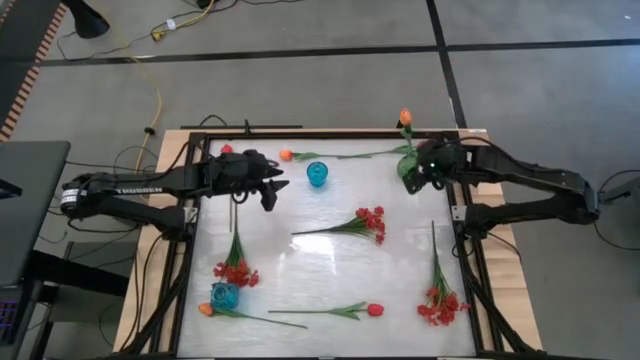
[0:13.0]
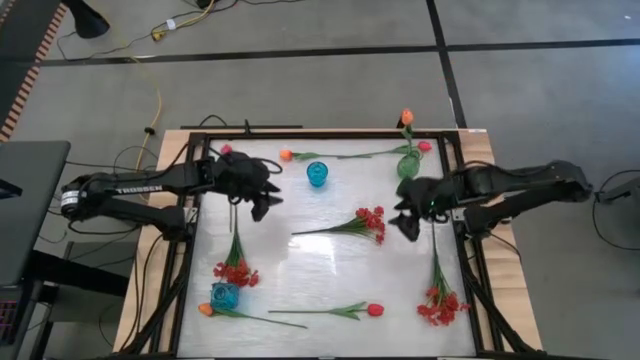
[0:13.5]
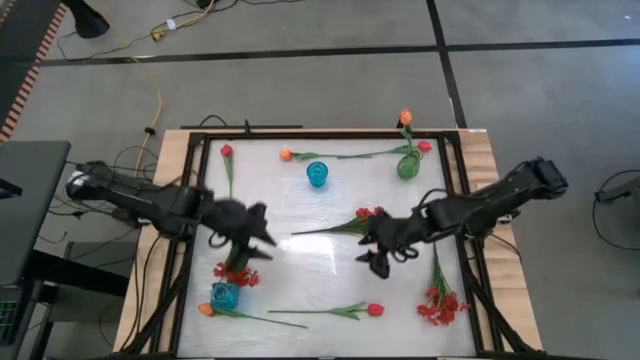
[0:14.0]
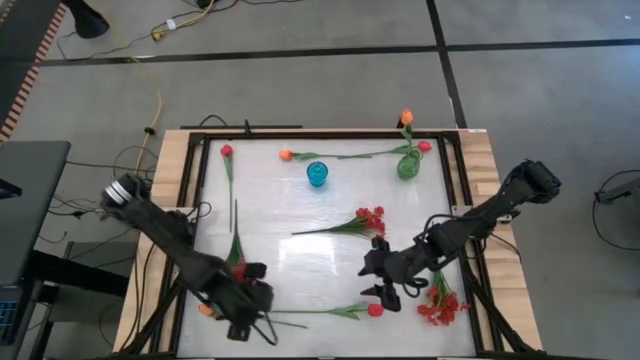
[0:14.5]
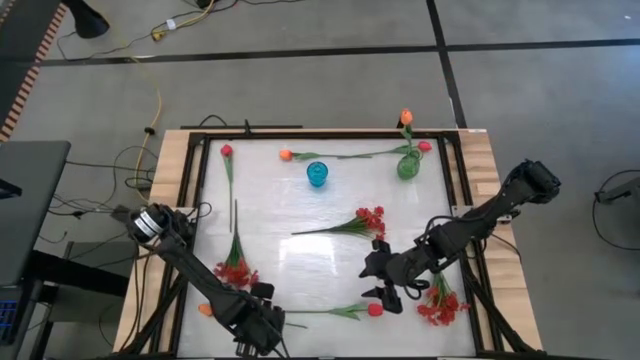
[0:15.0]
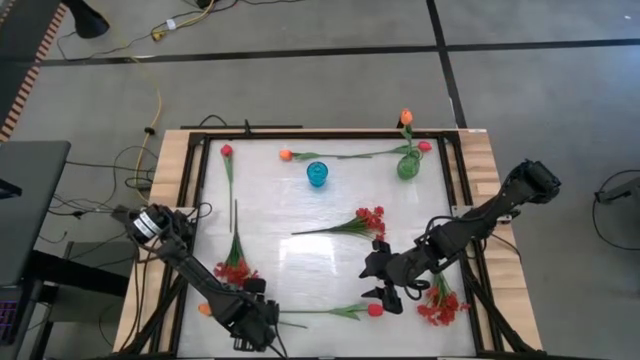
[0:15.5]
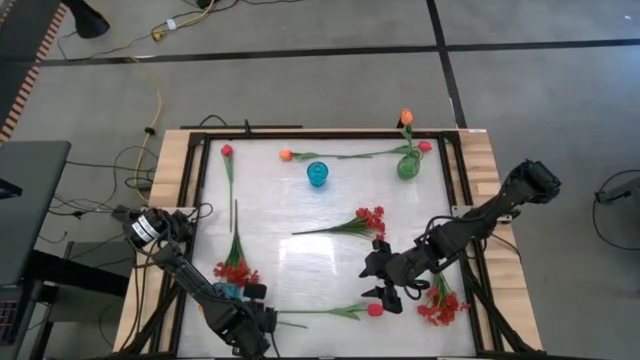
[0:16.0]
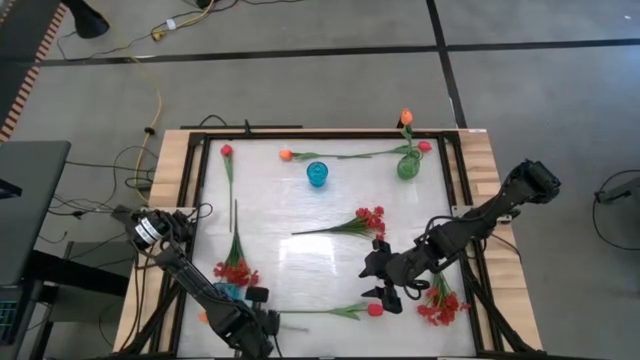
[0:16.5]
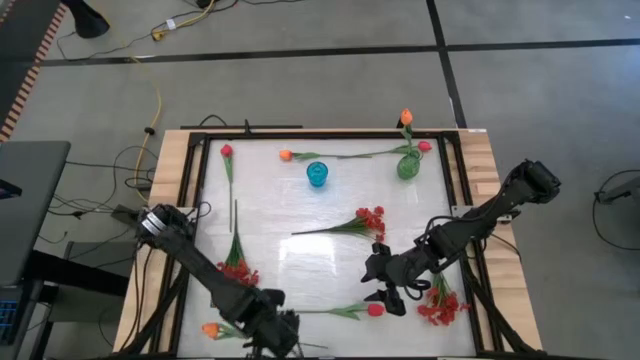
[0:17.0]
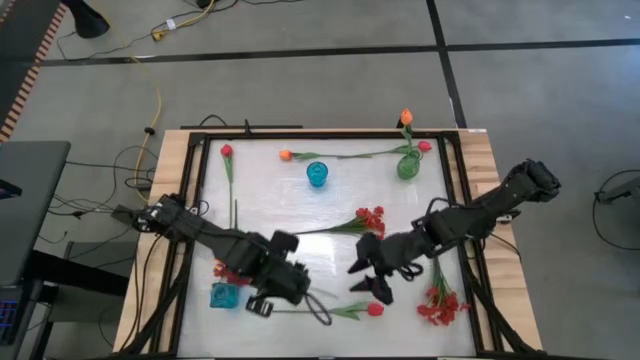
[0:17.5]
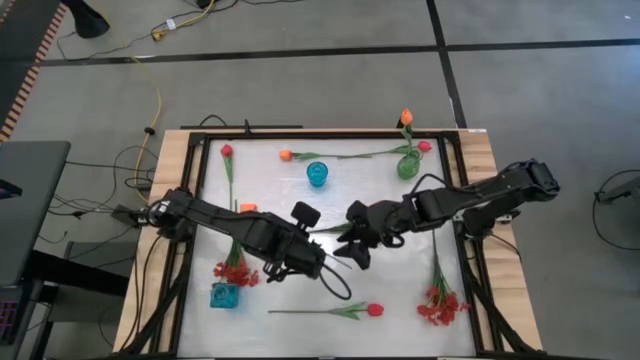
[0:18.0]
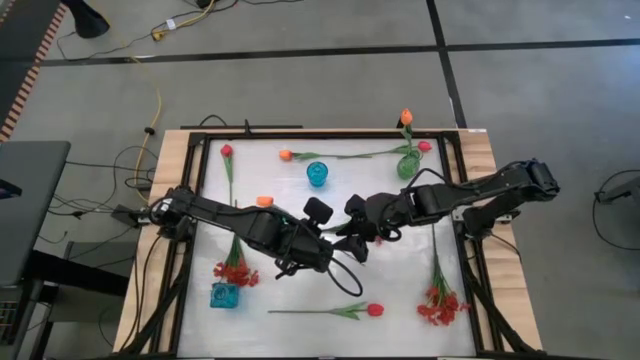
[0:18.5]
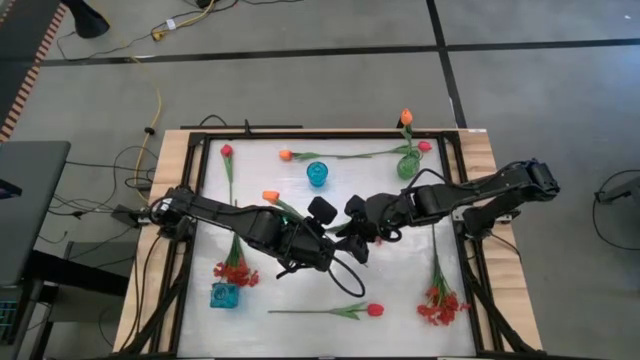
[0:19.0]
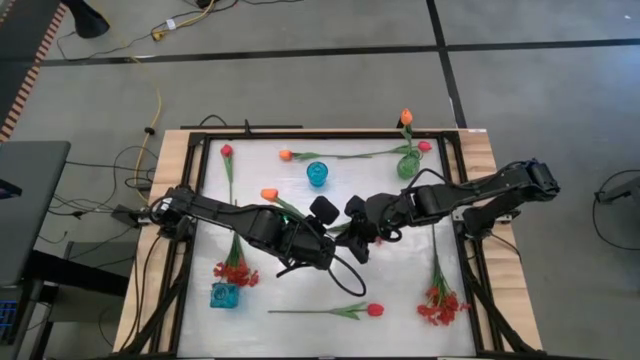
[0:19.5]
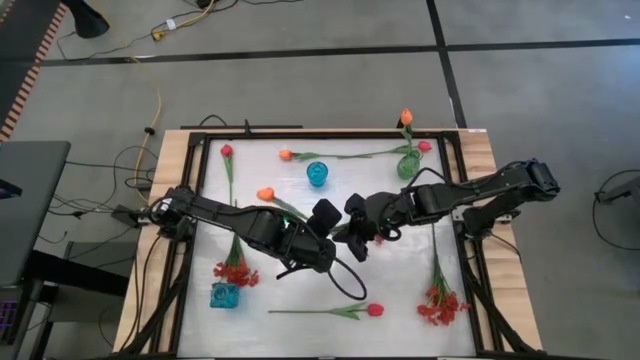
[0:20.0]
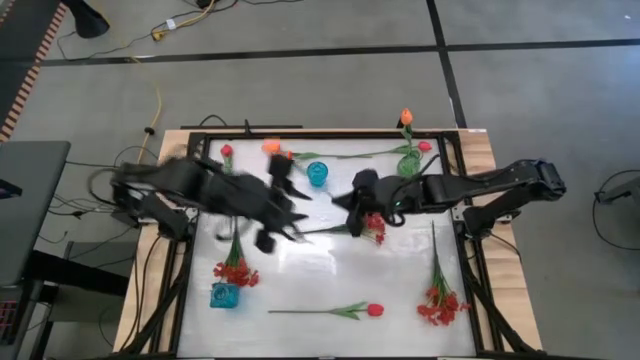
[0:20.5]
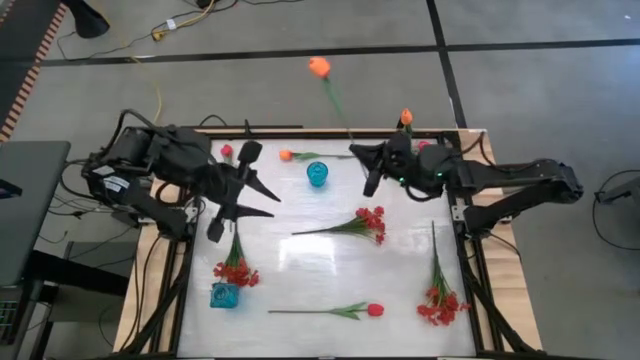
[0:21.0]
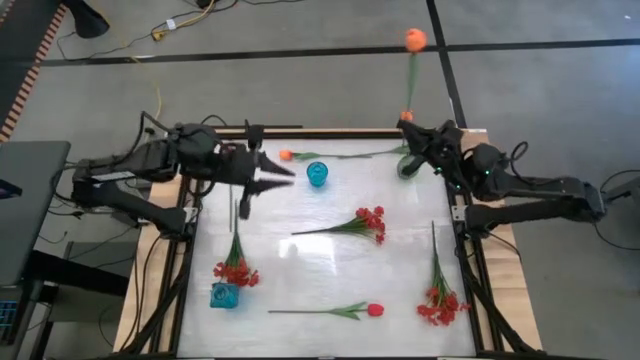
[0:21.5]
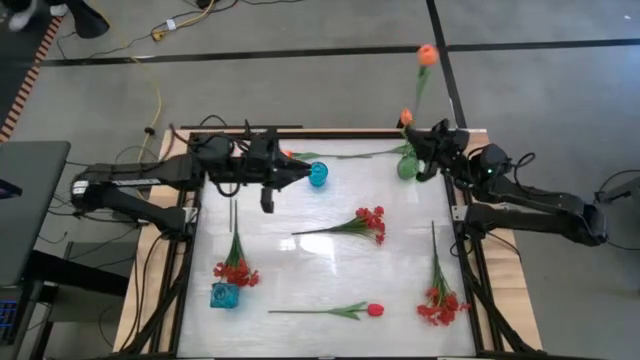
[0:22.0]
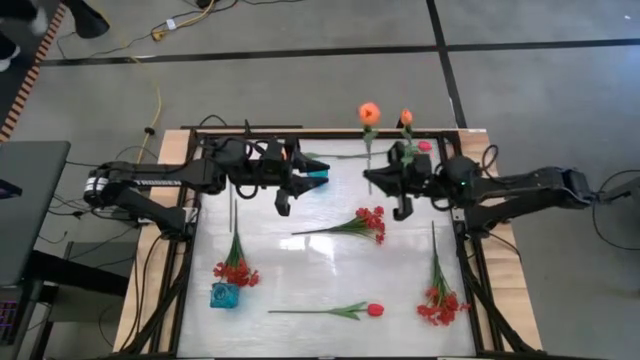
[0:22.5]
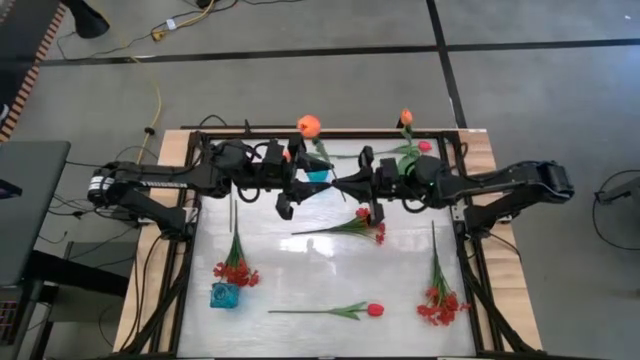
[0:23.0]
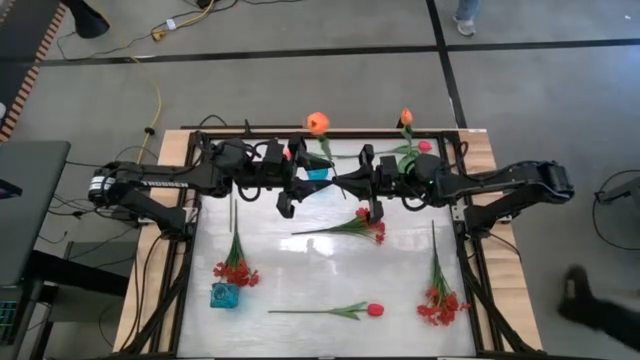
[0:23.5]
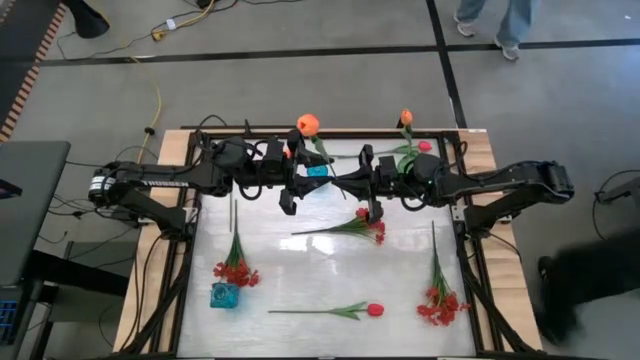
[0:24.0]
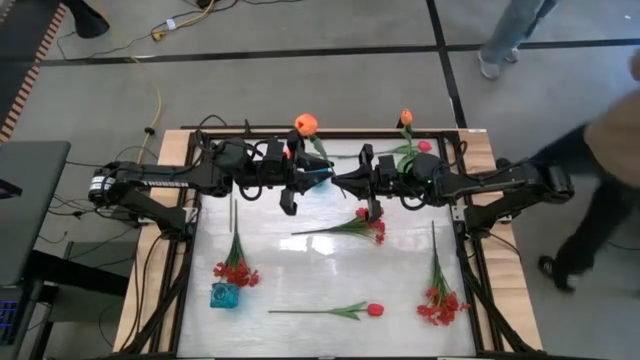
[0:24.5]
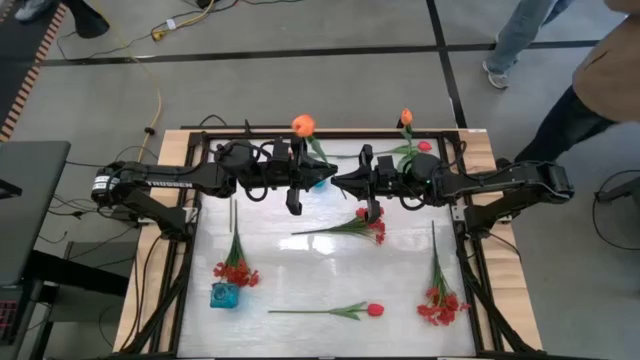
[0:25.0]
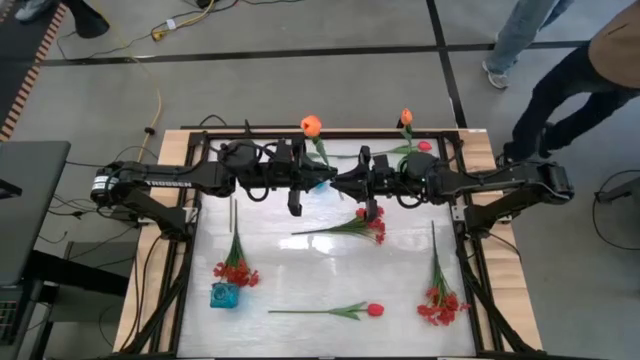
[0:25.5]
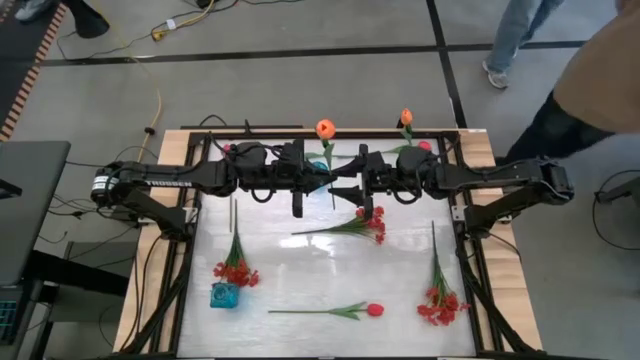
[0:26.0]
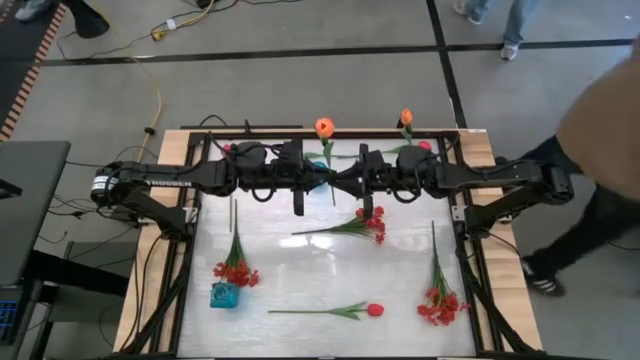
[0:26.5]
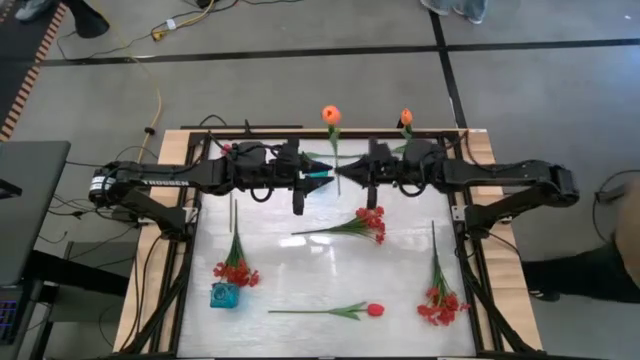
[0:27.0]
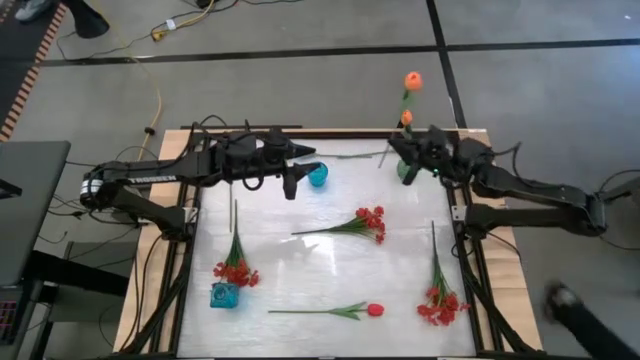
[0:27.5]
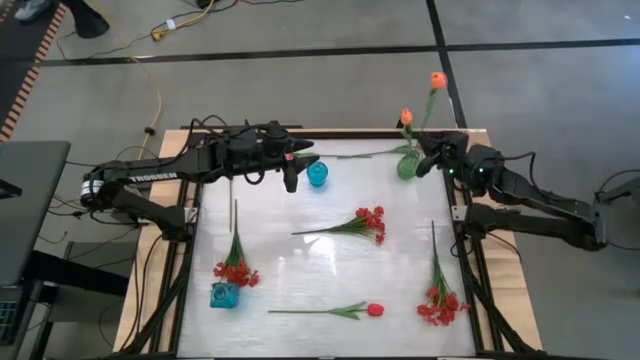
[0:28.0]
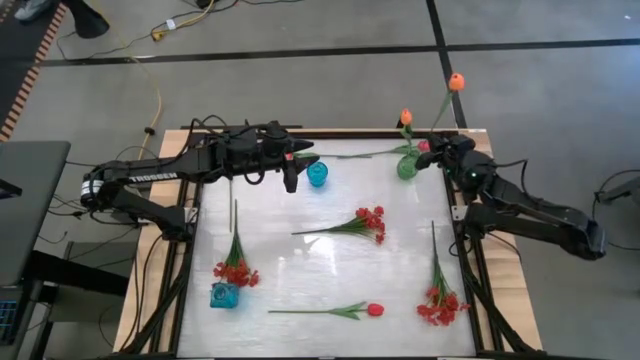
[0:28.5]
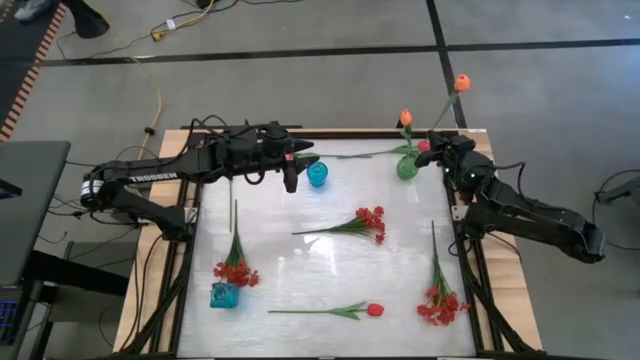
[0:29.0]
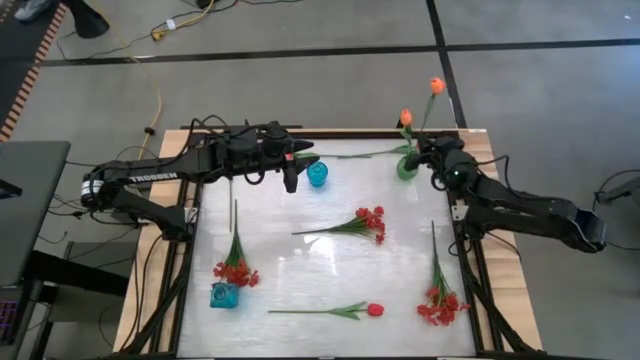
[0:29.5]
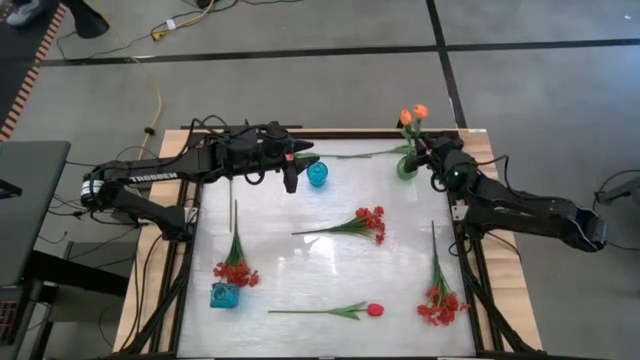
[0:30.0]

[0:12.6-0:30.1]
Task: Sort flowers into vase by color
Put the bottom orange tulip into the green vase

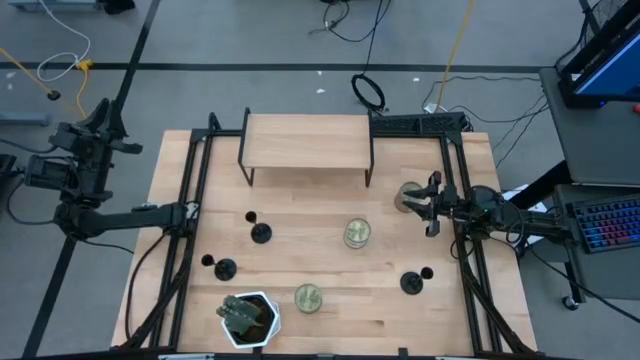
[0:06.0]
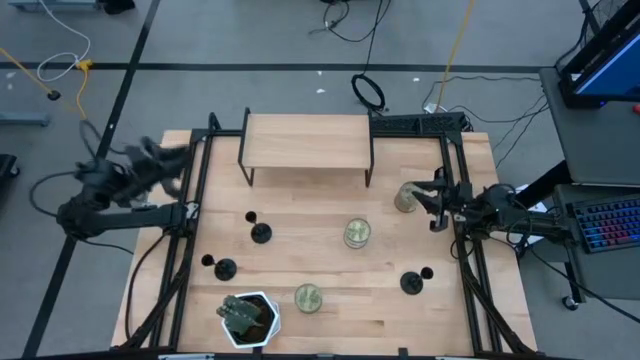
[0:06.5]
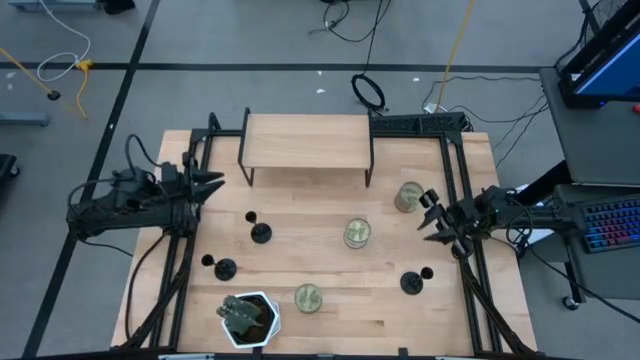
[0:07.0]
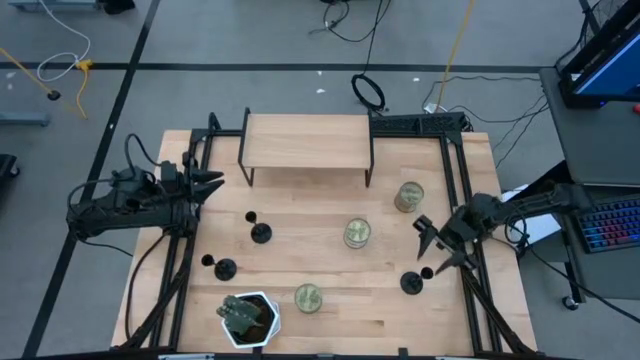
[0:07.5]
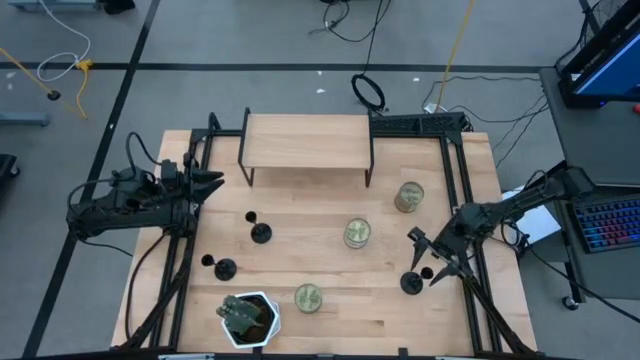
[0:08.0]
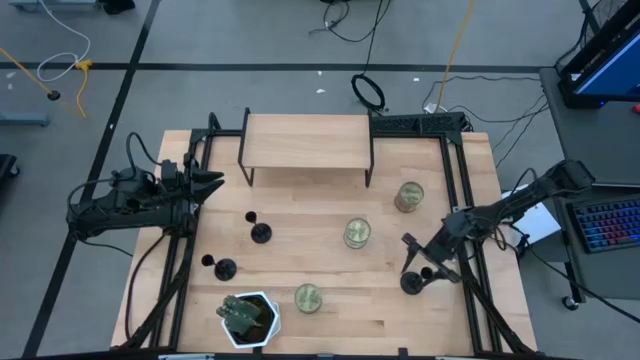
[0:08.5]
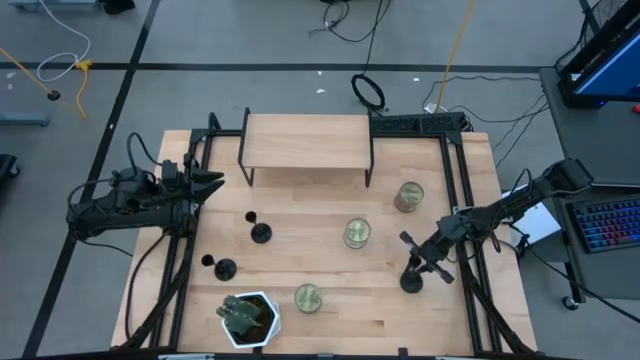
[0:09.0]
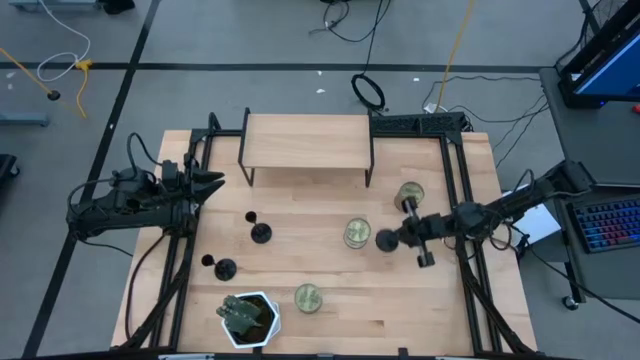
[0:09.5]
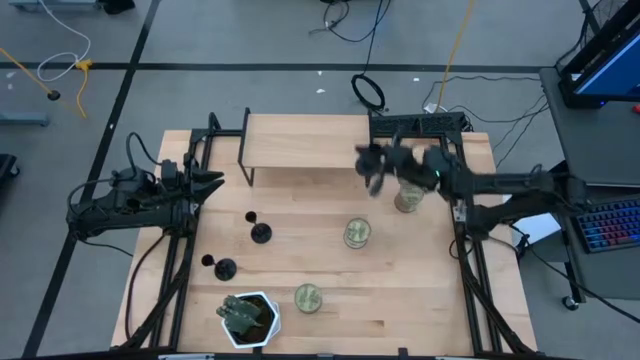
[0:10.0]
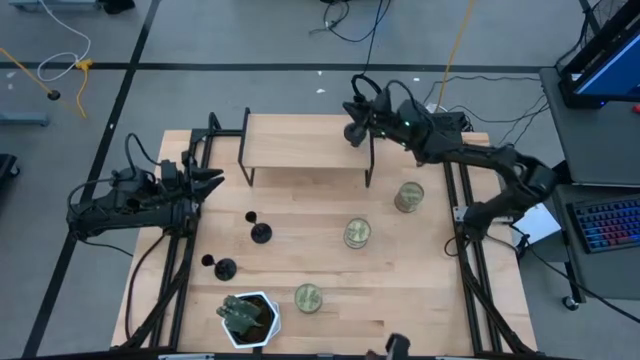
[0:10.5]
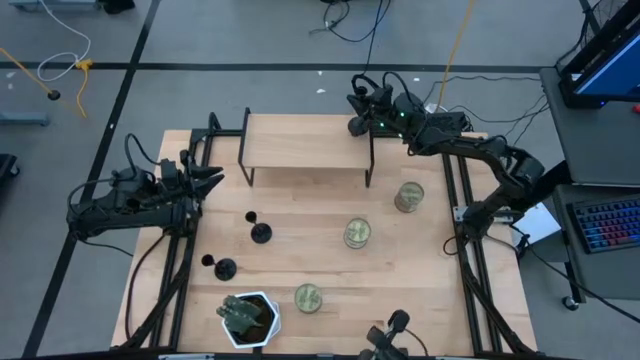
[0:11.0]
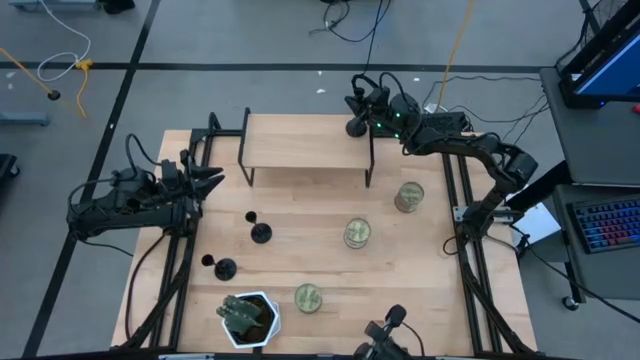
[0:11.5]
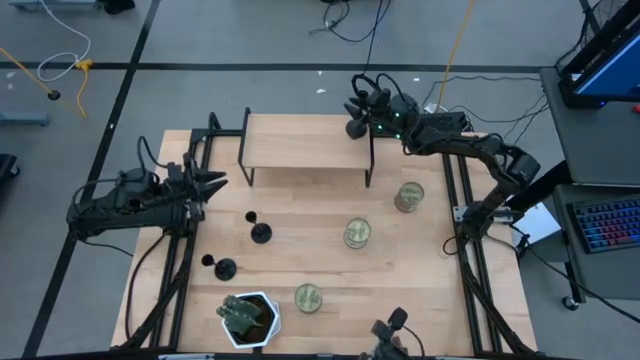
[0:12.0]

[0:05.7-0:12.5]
Task: Pick & Place candle stick holders
Put the right candle holder on the shelf
